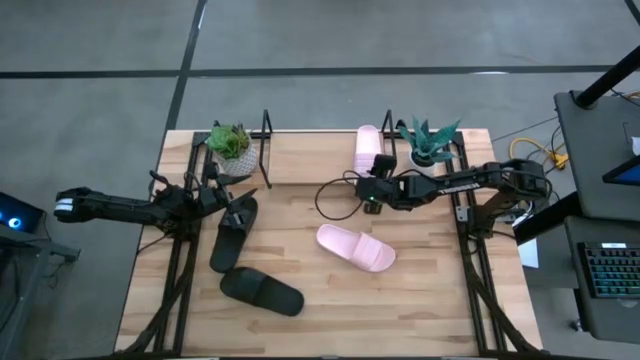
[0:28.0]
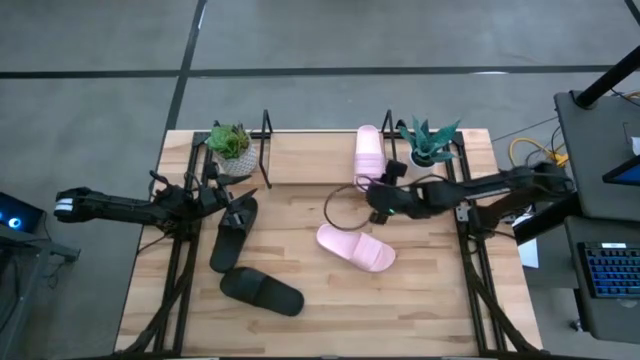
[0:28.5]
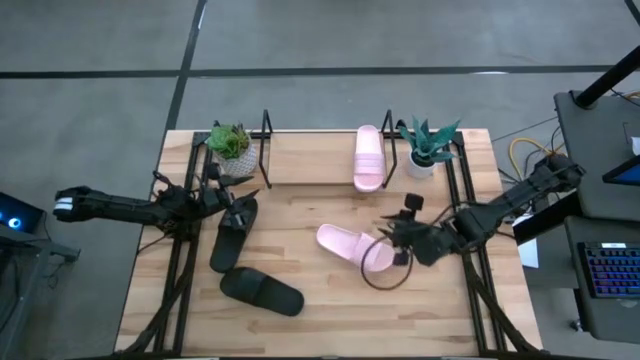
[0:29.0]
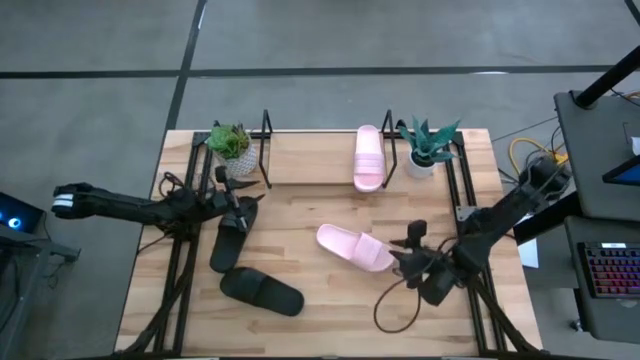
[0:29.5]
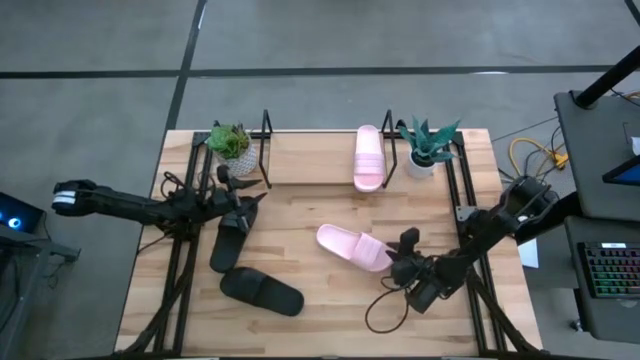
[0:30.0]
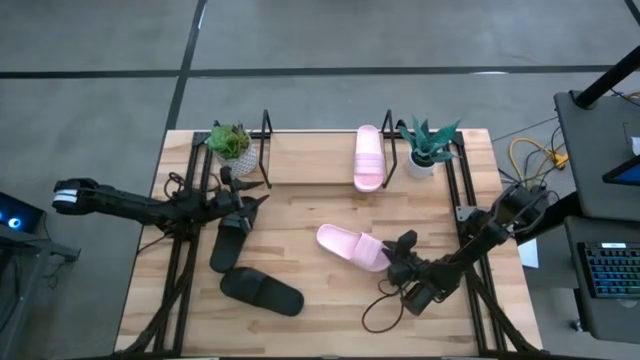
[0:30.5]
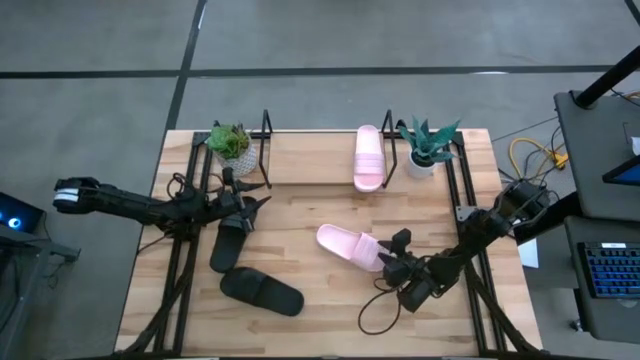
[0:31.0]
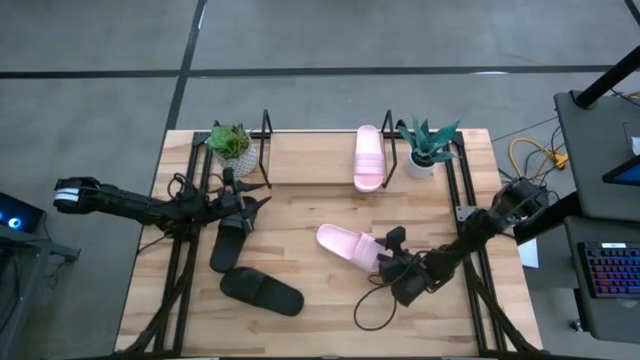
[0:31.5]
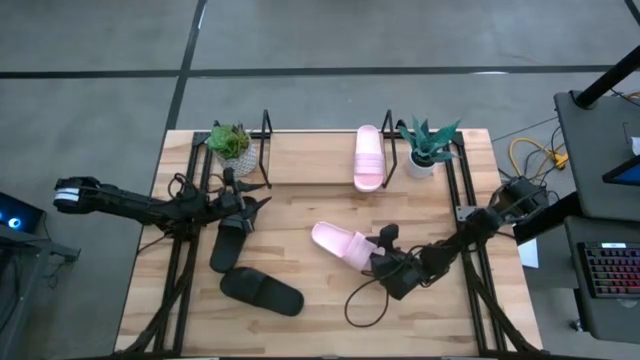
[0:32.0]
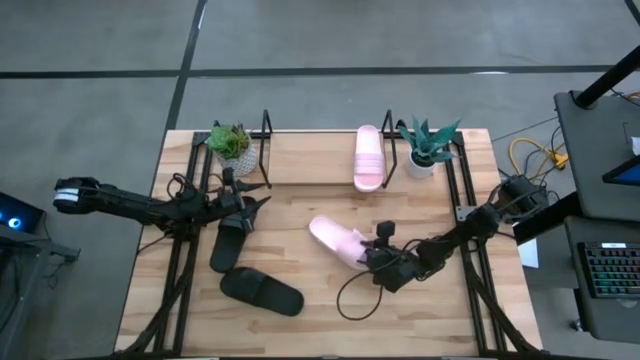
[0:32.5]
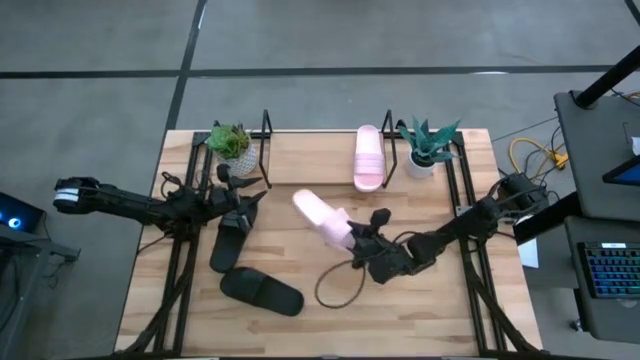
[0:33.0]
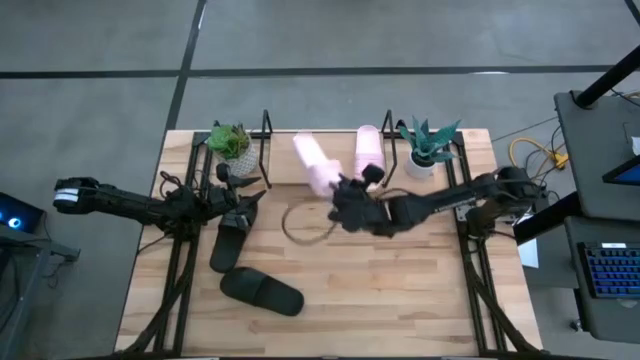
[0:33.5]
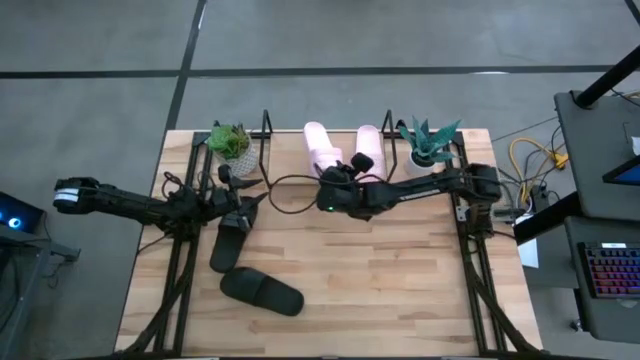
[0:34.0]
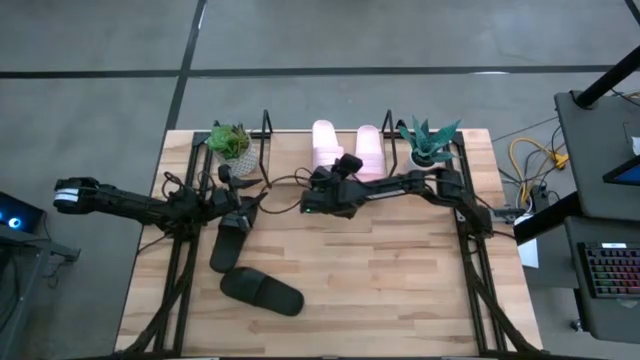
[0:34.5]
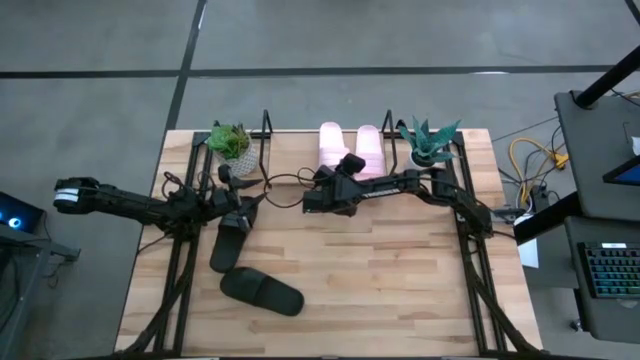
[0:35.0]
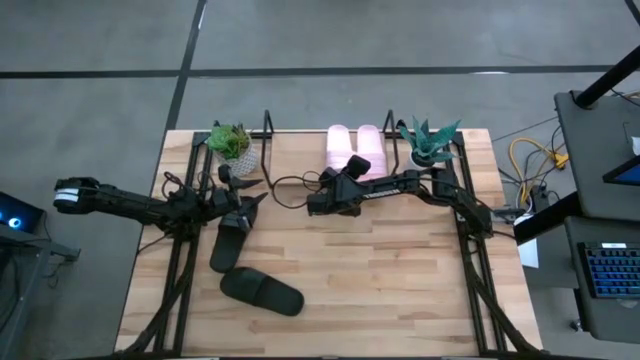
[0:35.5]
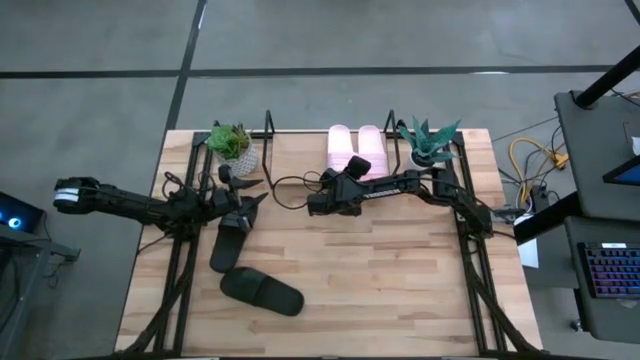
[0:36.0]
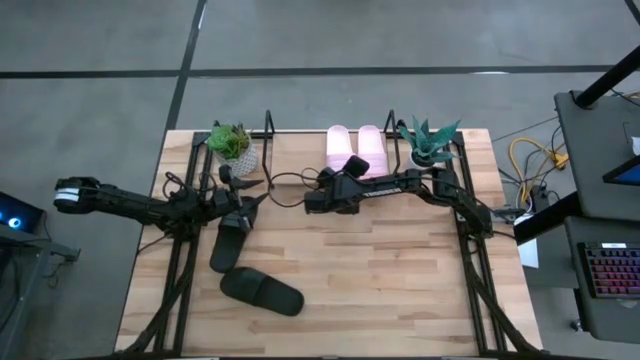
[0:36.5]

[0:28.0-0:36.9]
Task: Pick and place slides into the shelf
Put the pink slipper on the shelf

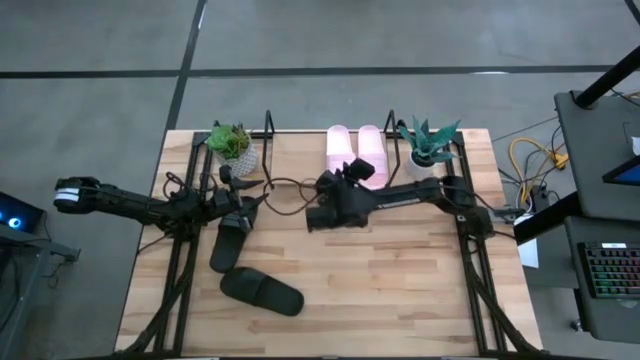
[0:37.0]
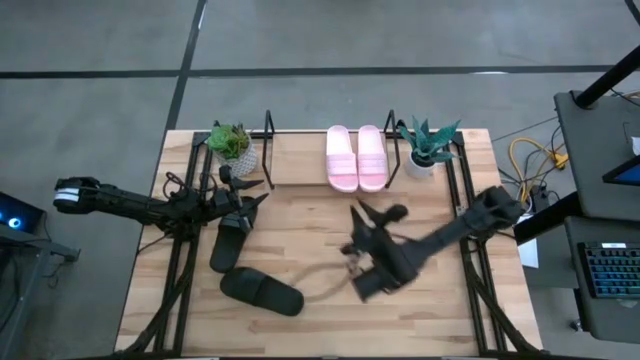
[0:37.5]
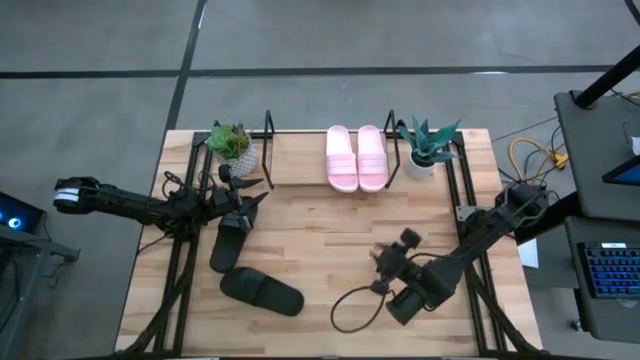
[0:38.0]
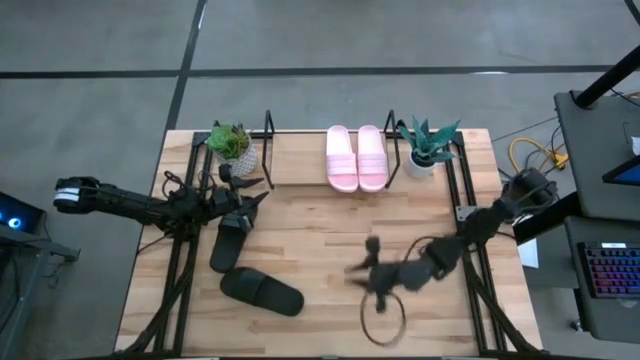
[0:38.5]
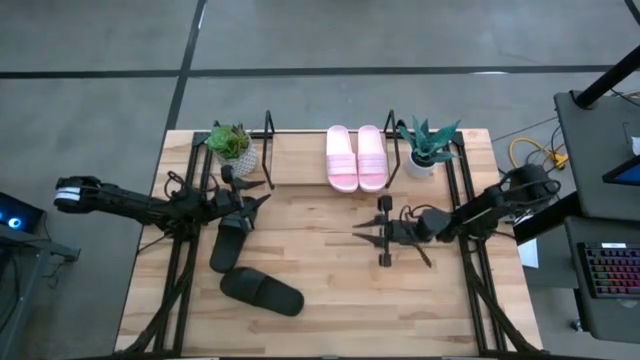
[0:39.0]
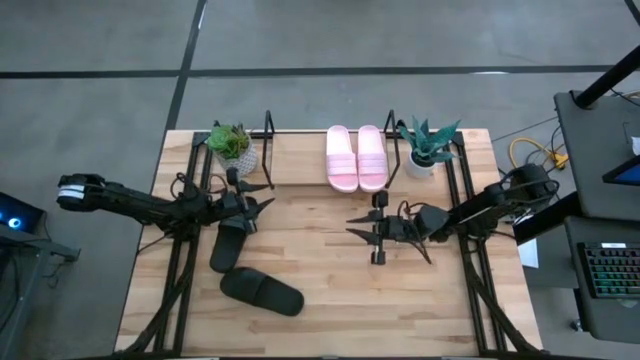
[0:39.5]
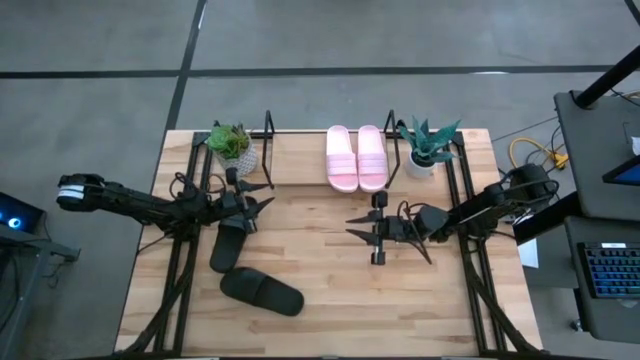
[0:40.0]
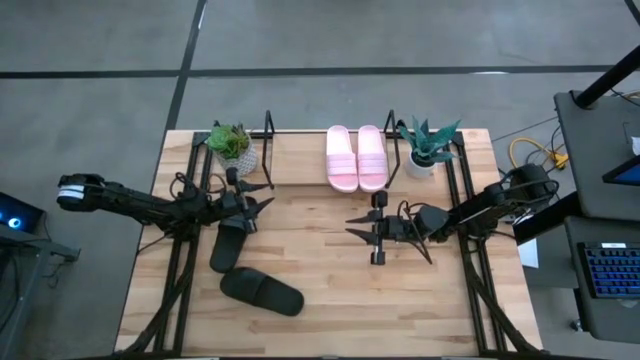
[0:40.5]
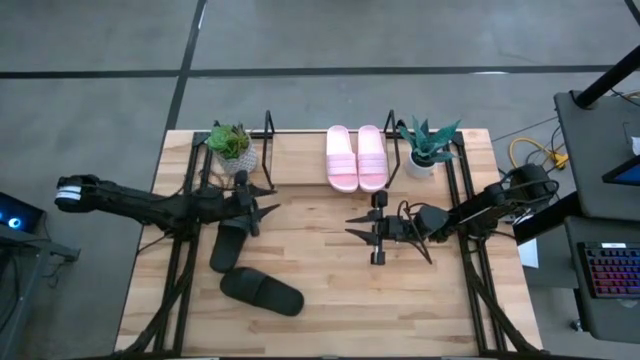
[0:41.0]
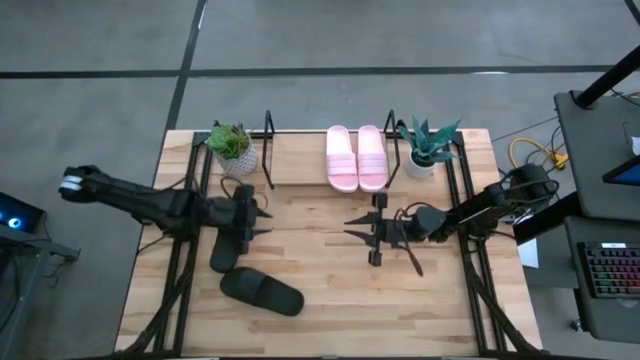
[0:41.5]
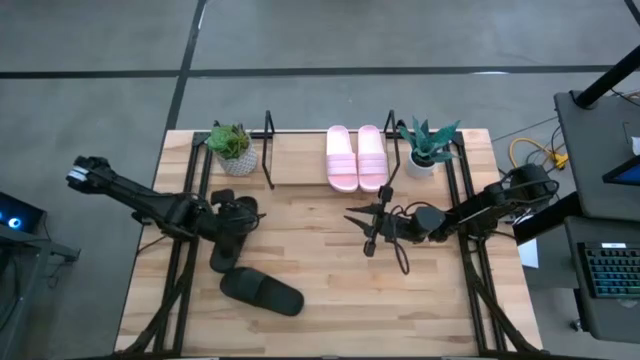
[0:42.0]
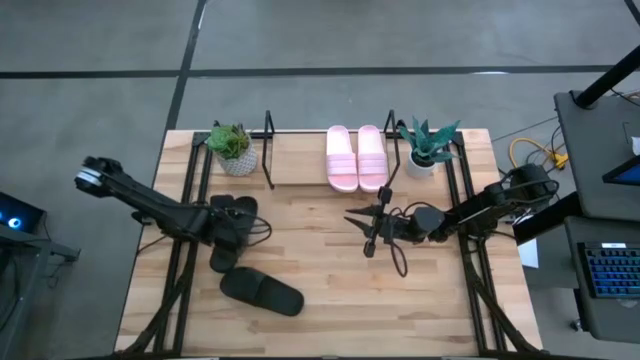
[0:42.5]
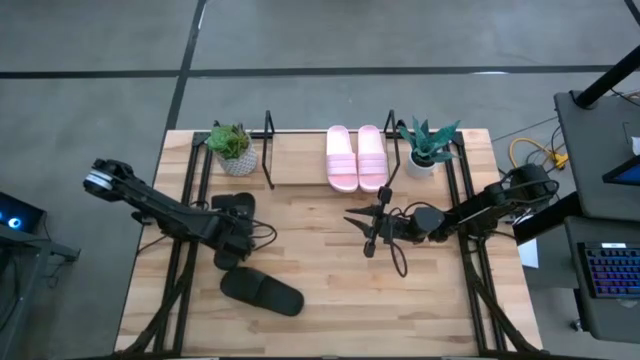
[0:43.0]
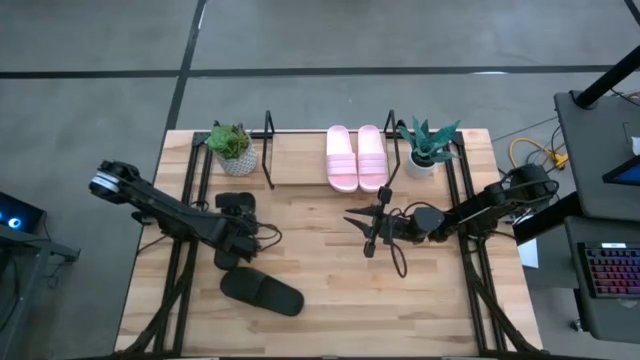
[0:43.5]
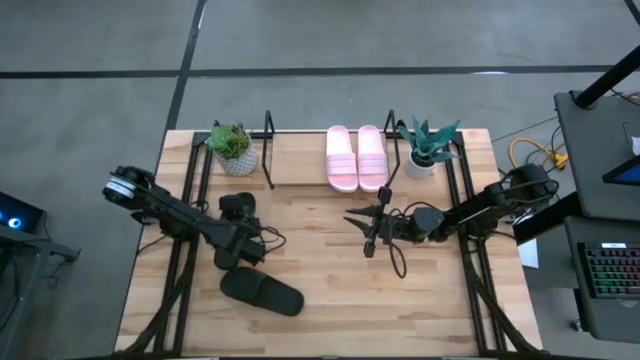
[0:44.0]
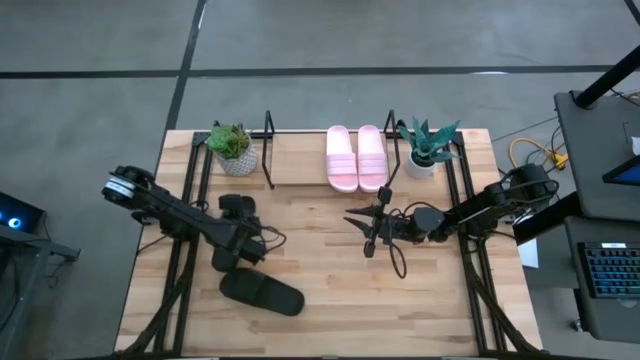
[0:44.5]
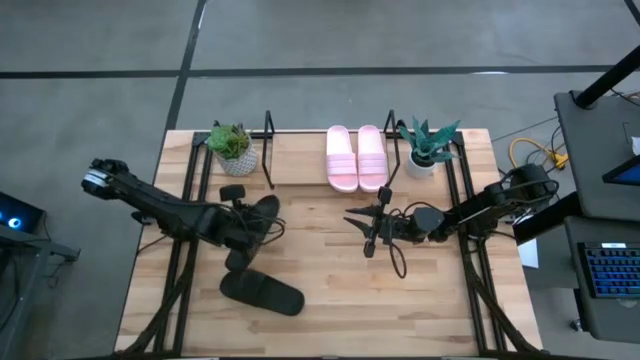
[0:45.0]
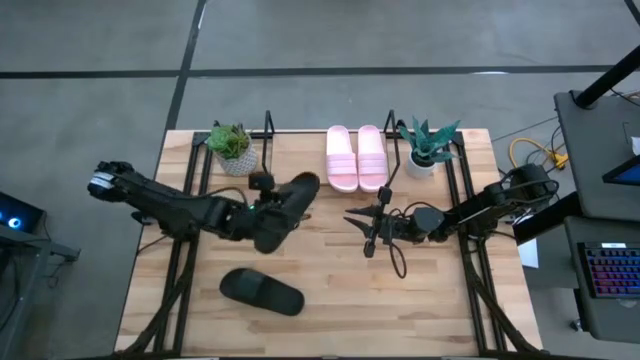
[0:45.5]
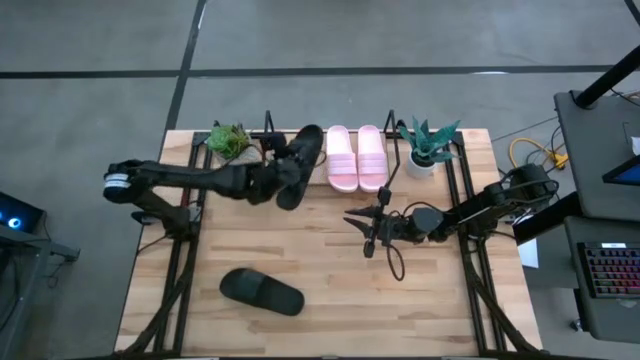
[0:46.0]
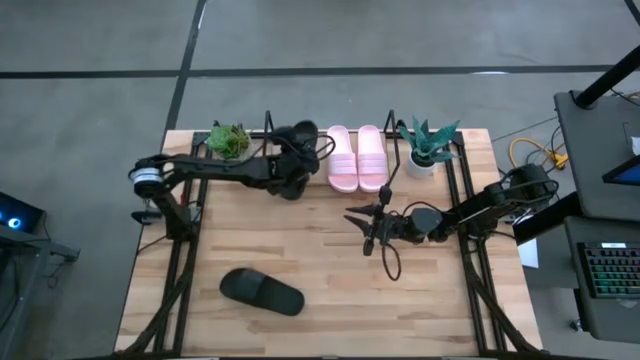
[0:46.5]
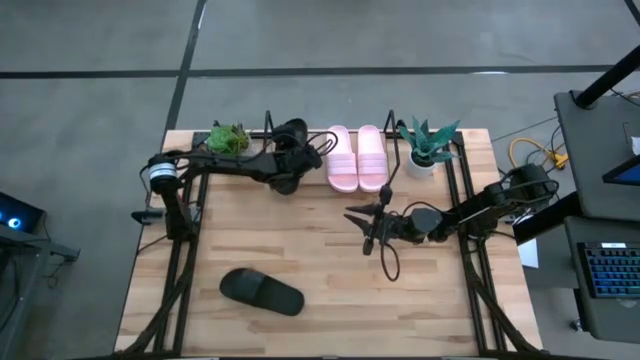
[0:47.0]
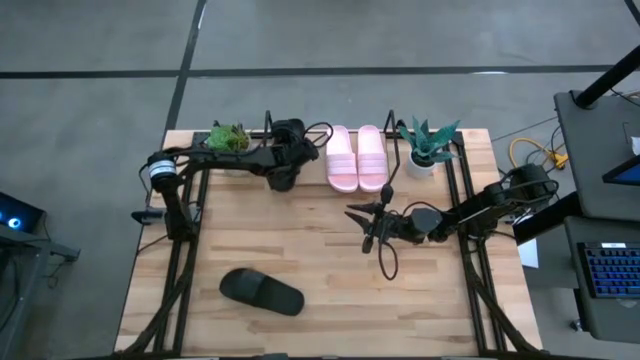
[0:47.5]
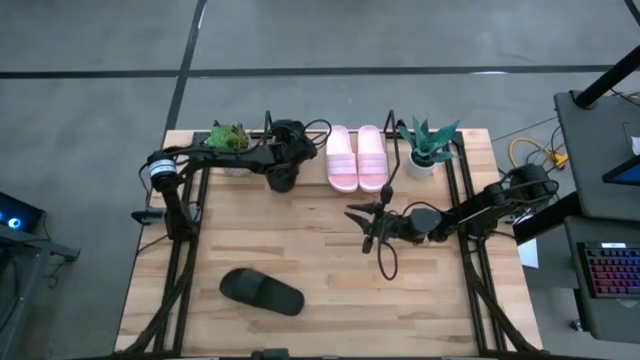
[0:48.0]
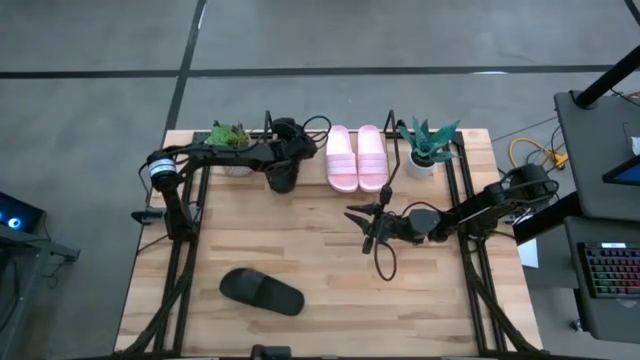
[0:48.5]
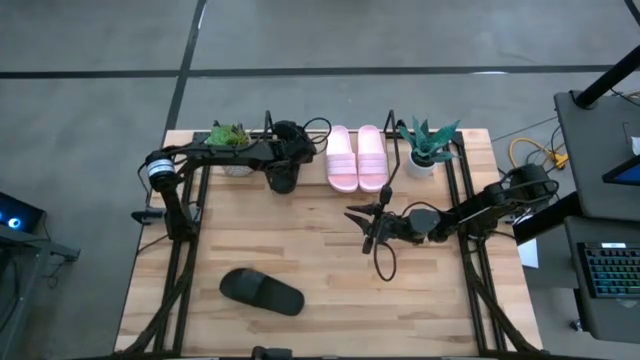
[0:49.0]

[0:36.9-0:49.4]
Put the top black slipper on the shelf
